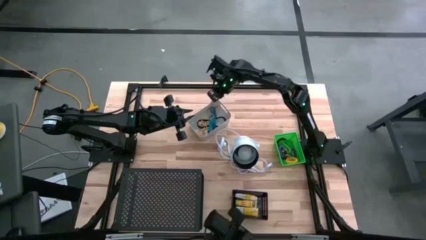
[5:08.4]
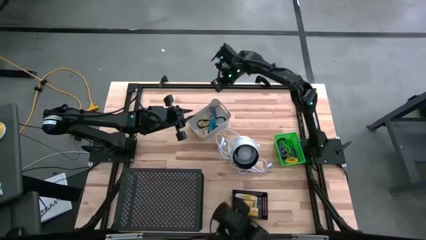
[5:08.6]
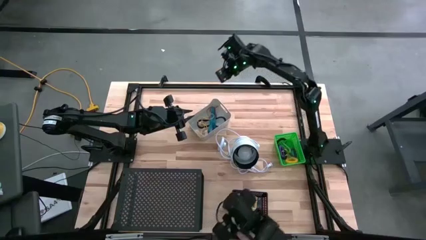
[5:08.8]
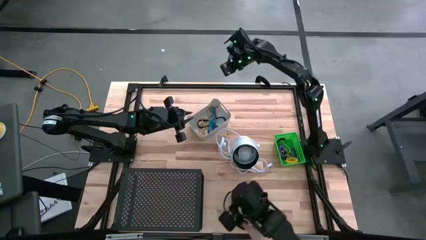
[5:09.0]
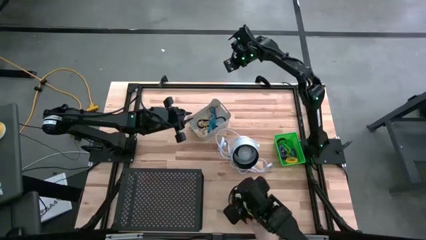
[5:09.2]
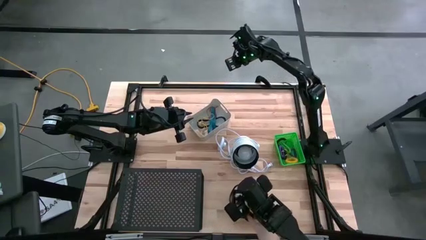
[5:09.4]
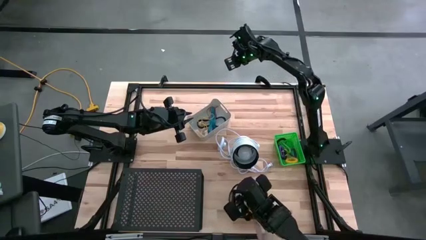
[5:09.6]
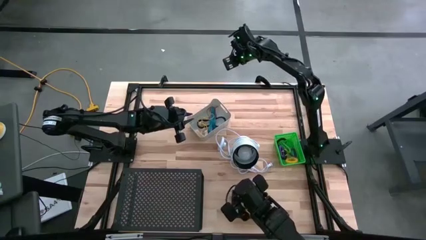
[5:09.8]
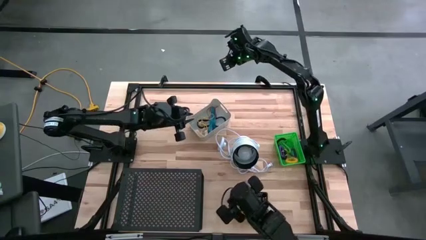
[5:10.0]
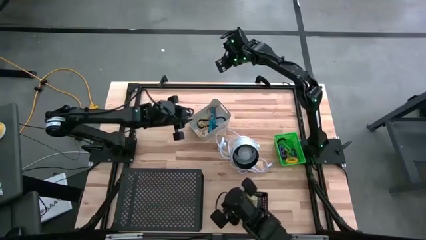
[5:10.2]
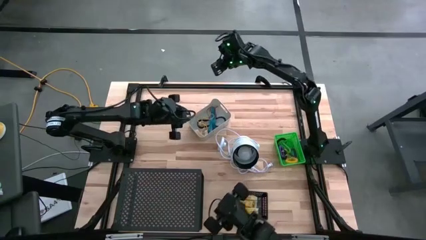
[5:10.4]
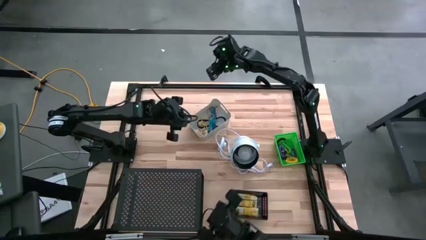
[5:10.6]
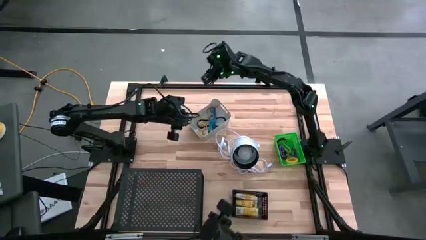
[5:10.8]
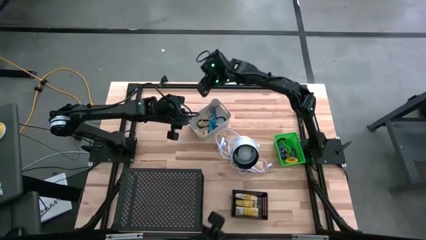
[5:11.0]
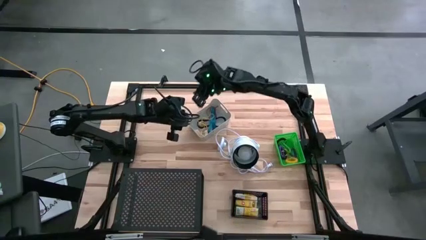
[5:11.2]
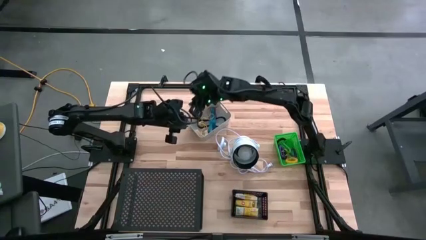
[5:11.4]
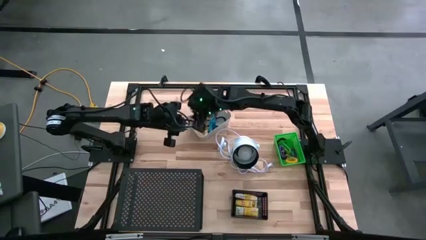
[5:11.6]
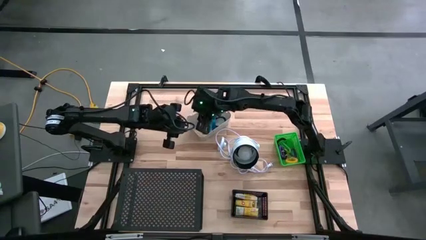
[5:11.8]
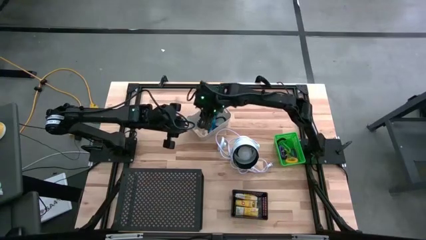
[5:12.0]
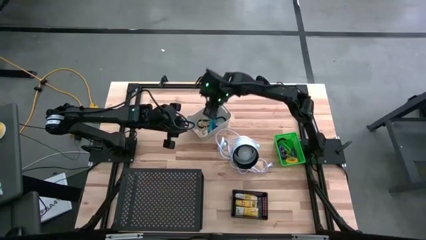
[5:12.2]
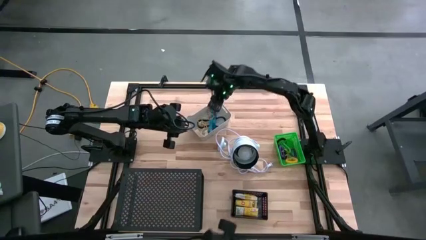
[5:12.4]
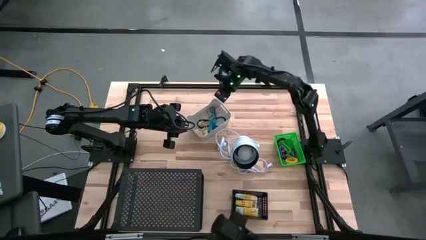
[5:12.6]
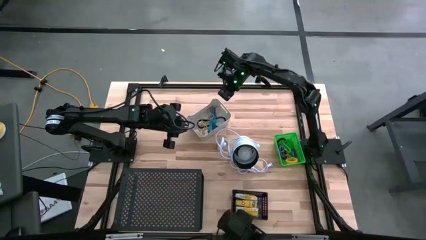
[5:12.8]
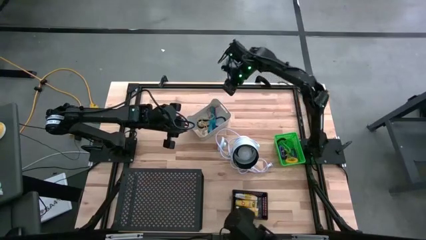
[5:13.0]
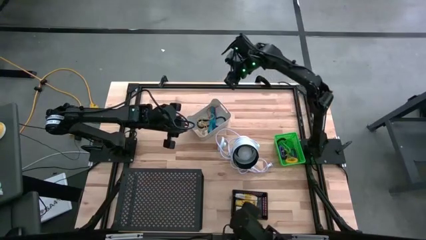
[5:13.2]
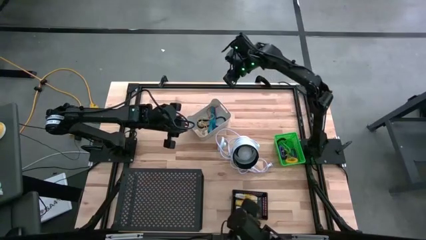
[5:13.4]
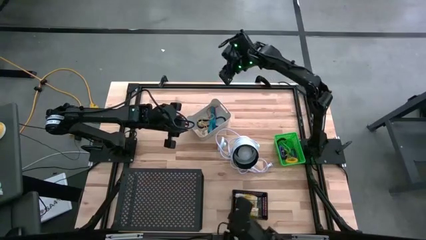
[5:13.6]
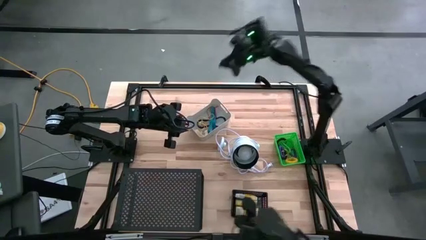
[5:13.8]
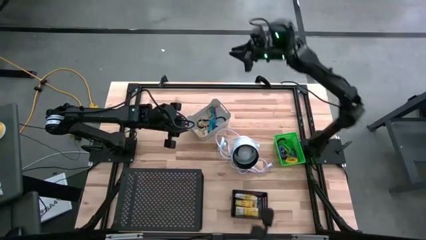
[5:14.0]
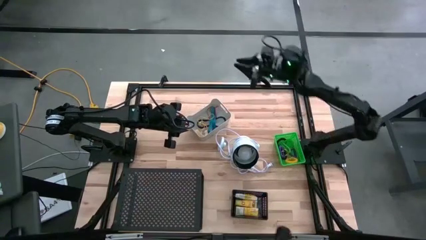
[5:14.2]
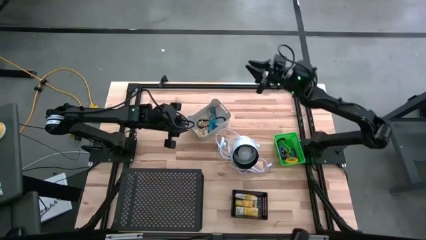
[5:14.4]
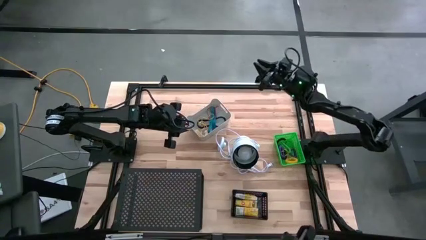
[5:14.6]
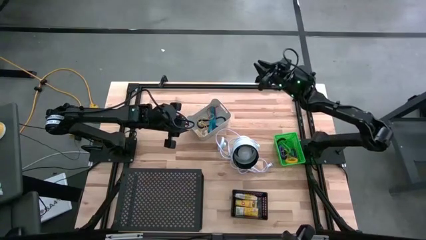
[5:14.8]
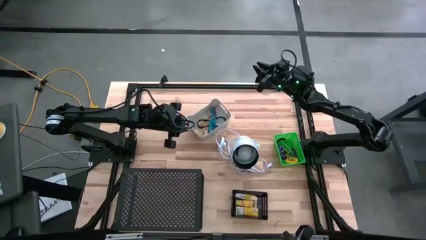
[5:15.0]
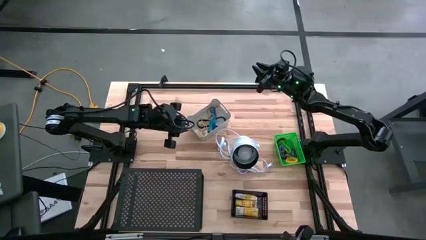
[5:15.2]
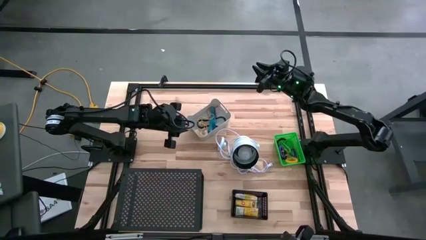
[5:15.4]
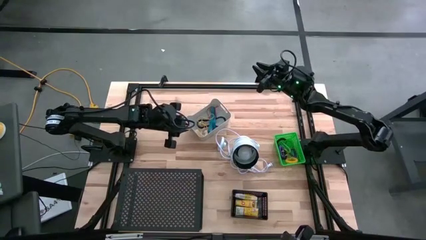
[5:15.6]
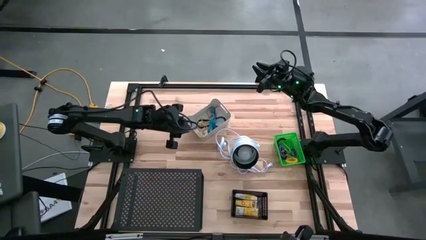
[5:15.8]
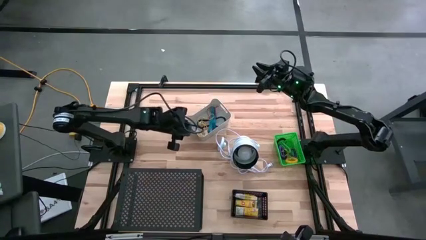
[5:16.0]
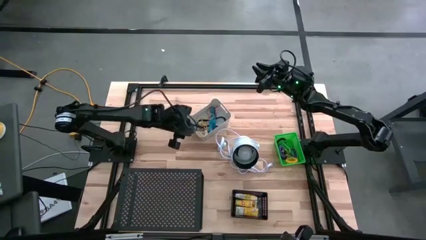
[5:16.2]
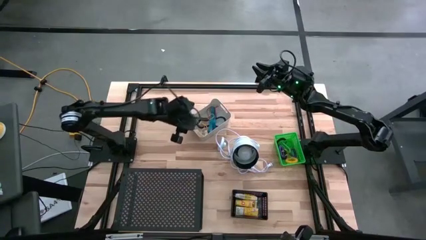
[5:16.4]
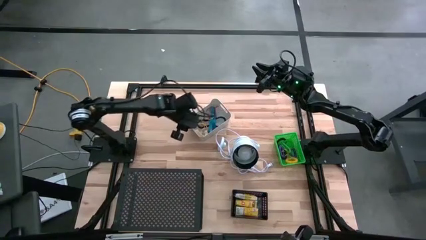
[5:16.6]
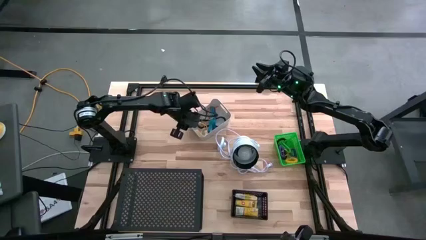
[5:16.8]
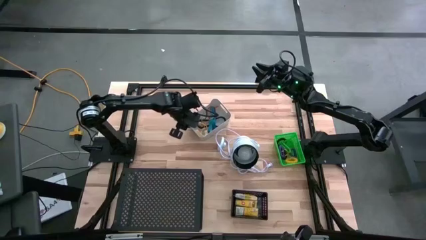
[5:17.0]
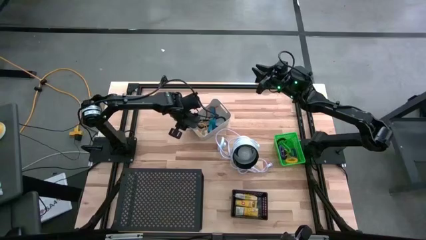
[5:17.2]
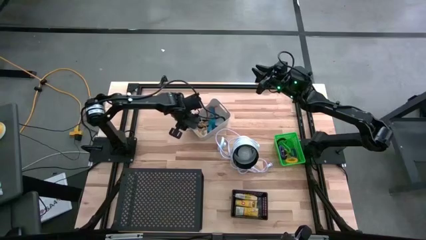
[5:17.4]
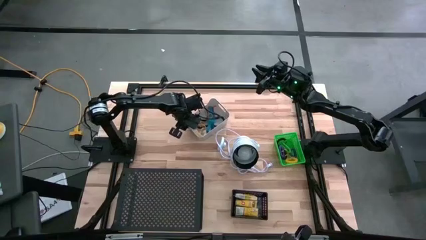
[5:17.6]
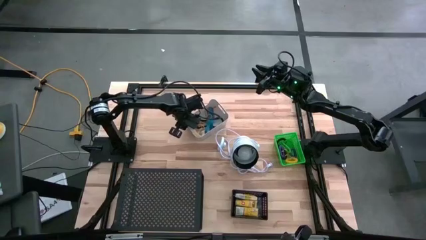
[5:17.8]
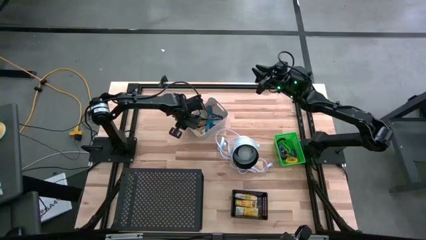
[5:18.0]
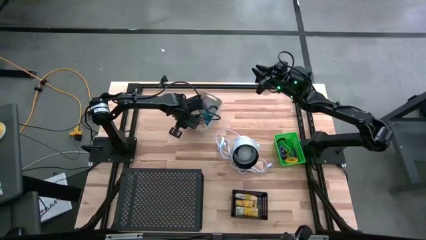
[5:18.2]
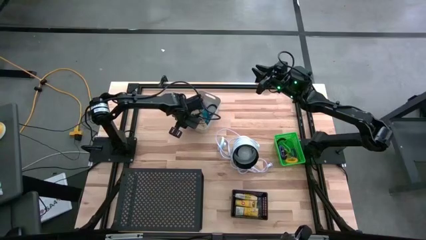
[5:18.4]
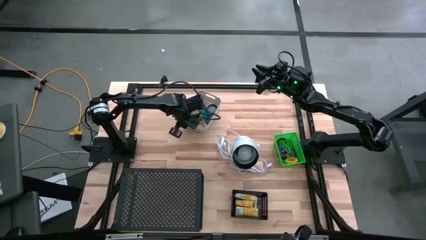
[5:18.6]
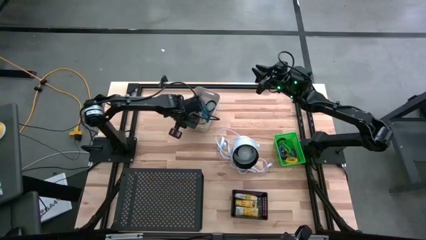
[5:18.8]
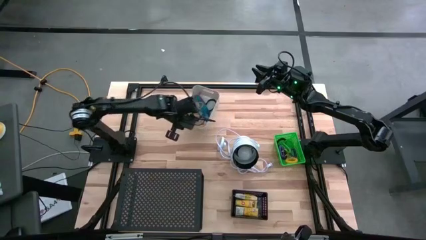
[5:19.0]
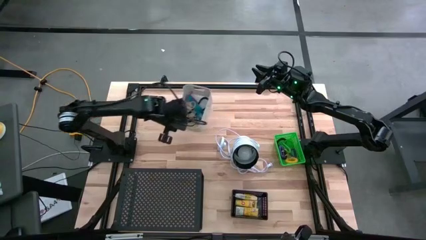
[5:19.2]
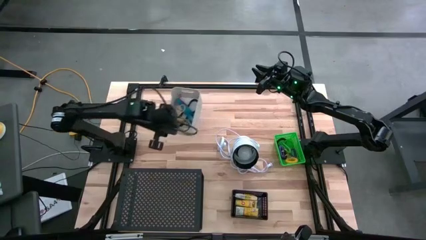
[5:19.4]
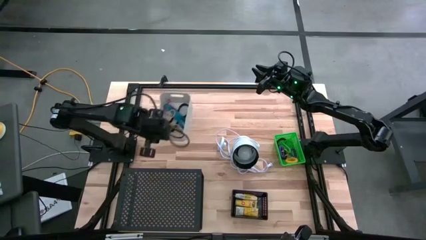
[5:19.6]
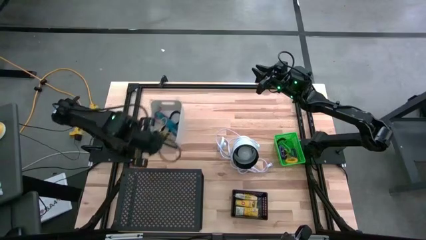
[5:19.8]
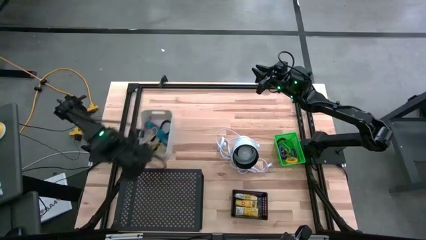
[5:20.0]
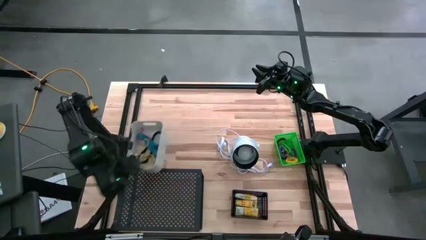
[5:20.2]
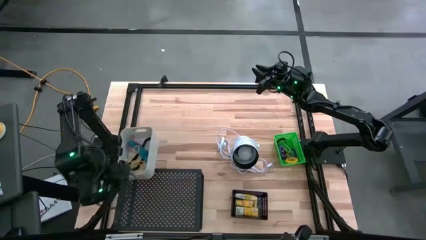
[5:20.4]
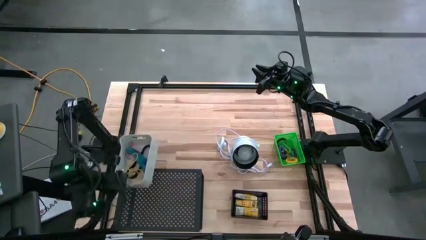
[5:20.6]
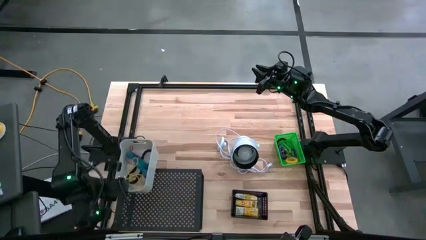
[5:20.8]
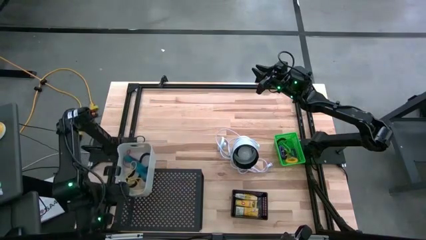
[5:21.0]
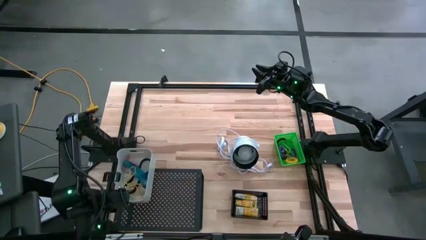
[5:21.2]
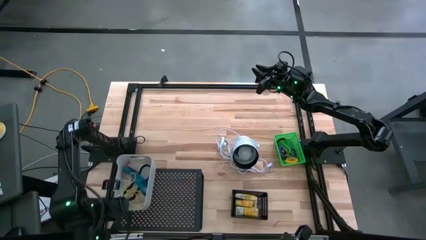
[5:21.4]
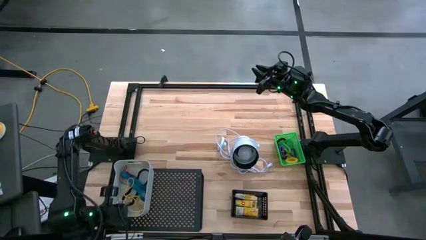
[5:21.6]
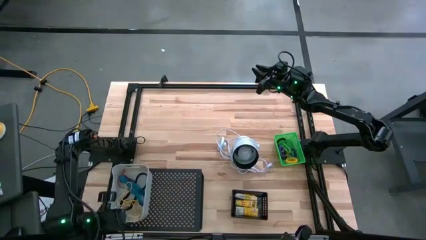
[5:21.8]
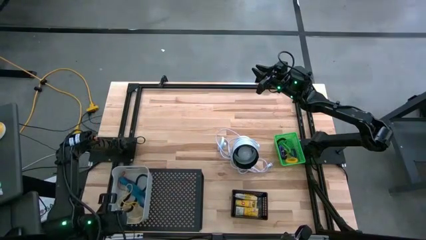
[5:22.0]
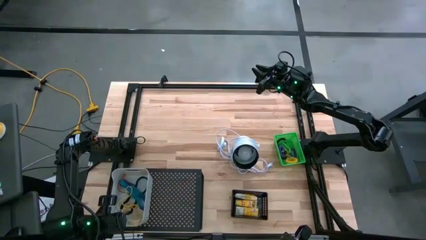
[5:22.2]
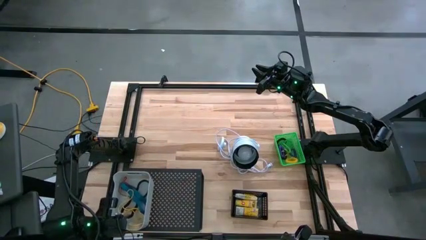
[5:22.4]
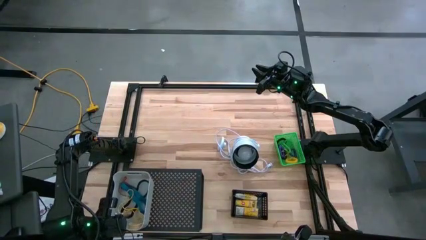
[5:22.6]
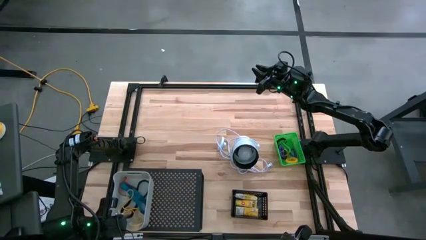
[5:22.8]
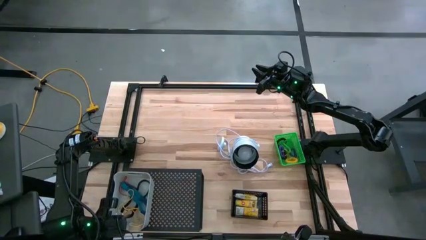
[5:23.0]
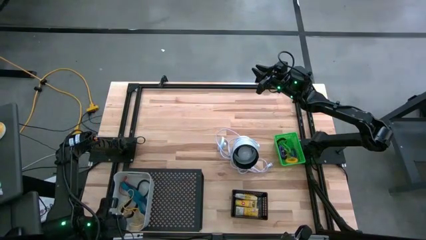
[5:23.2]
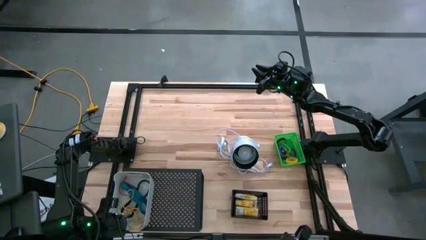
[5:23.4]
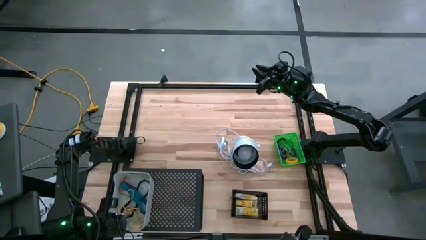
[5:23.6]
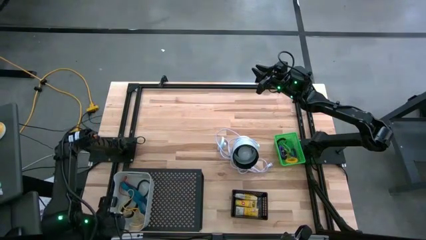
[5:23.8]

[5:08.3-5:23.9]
Task: Pick & Place Office Desk Supplies
Put the gray bin on the shelf
